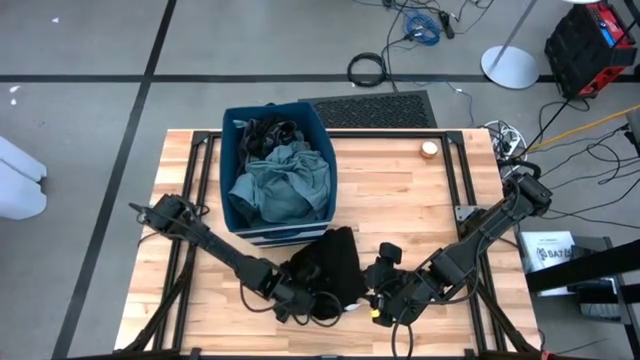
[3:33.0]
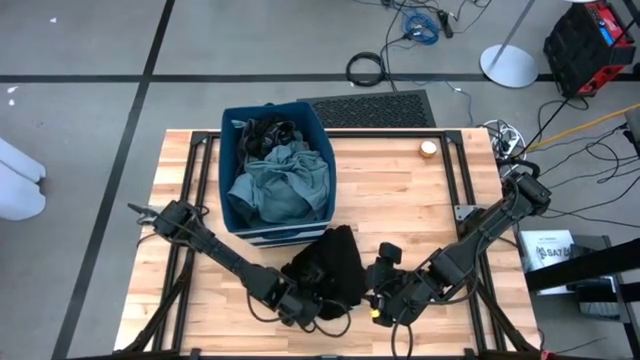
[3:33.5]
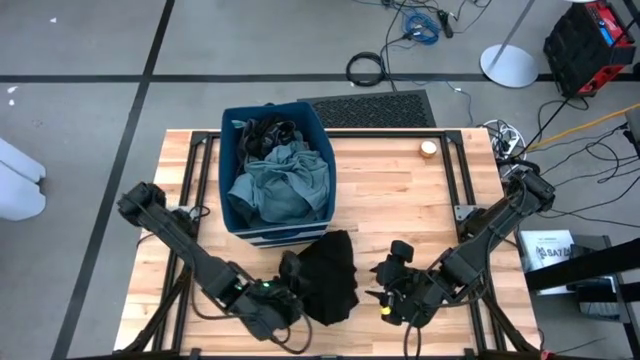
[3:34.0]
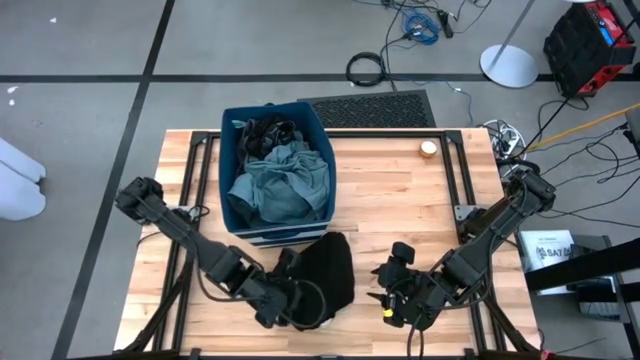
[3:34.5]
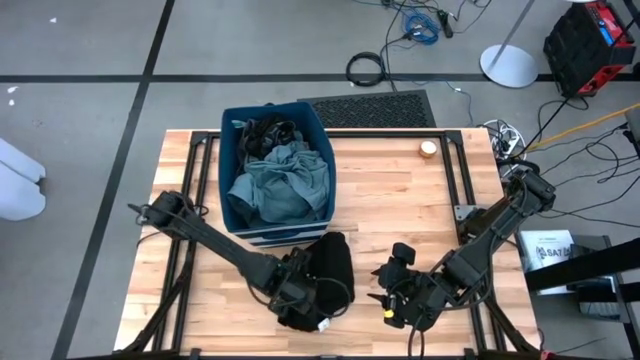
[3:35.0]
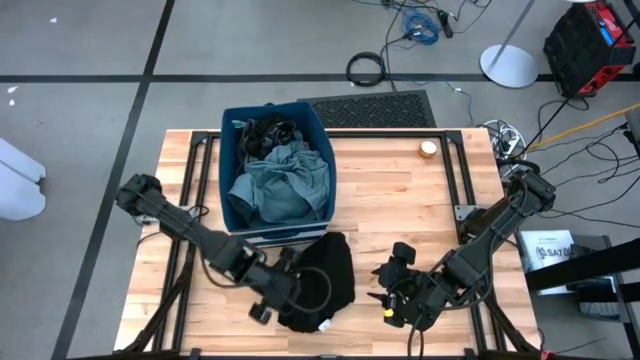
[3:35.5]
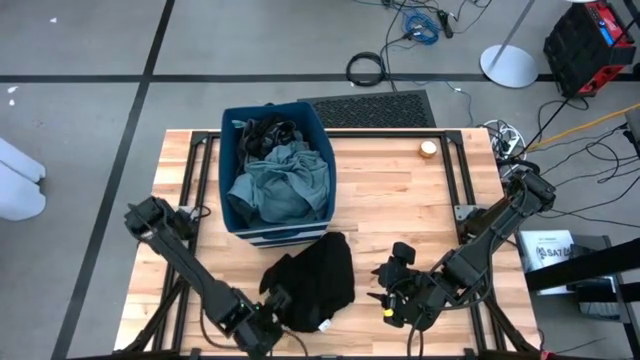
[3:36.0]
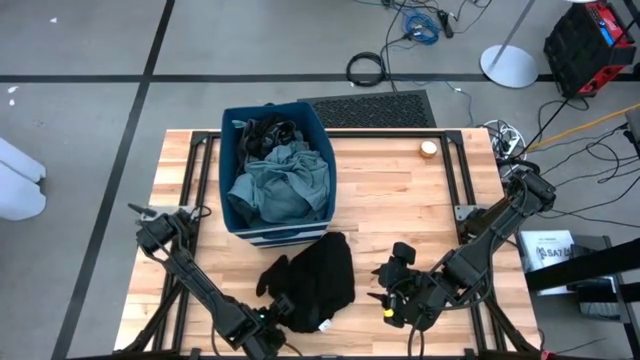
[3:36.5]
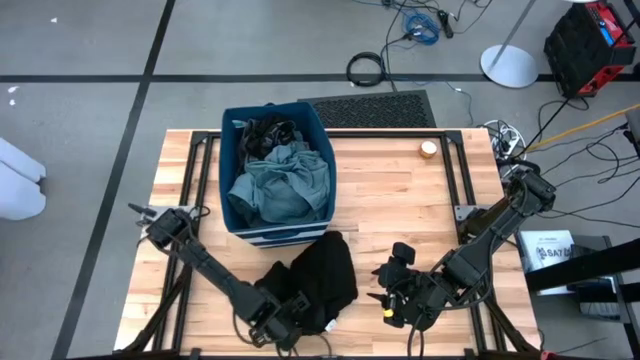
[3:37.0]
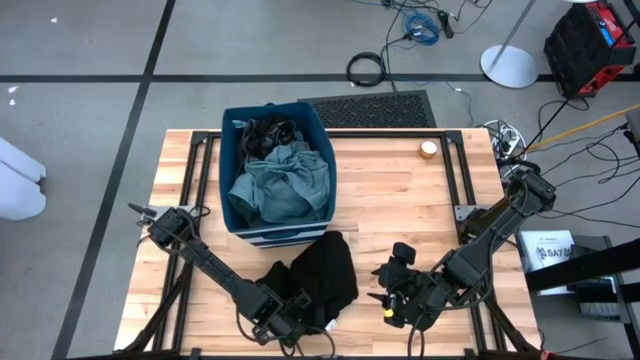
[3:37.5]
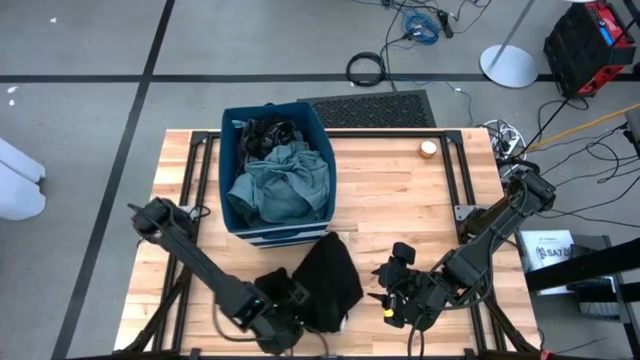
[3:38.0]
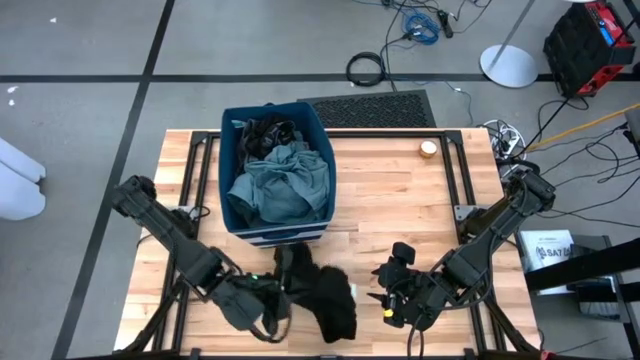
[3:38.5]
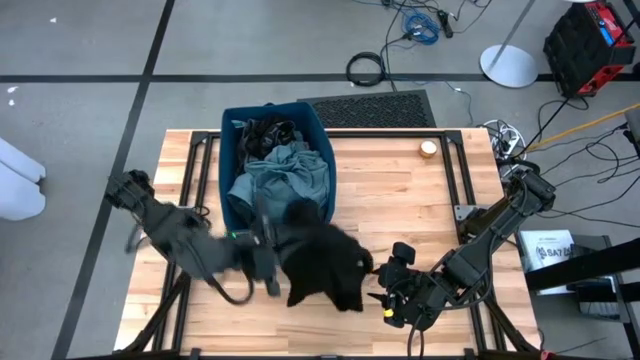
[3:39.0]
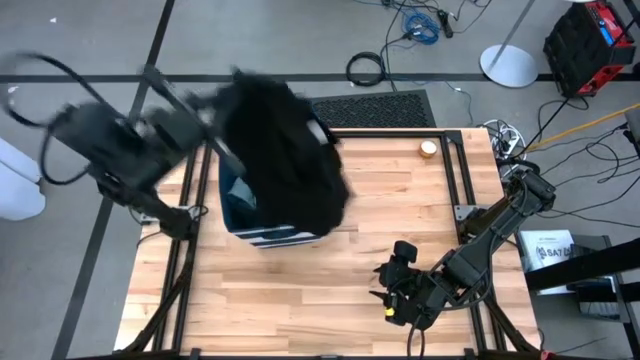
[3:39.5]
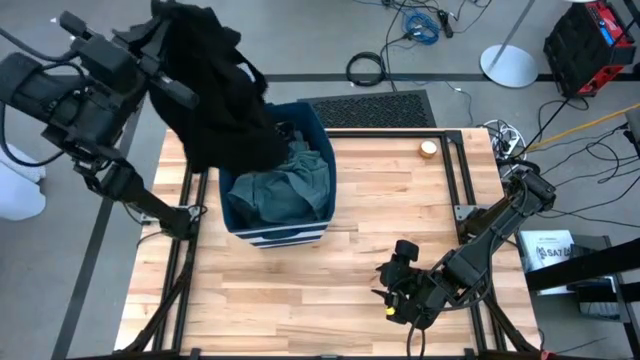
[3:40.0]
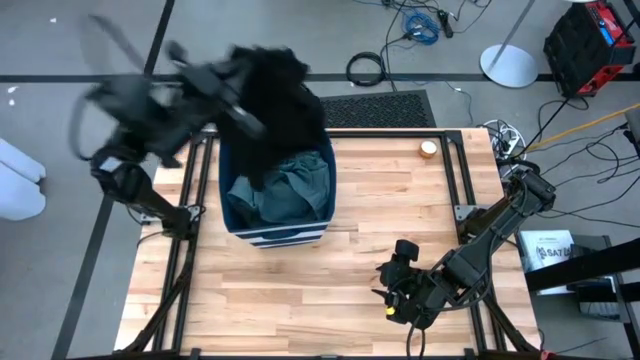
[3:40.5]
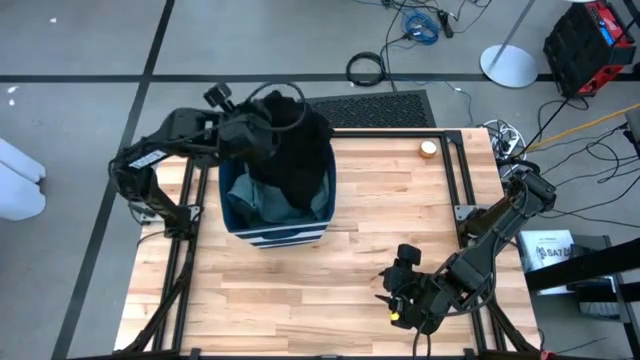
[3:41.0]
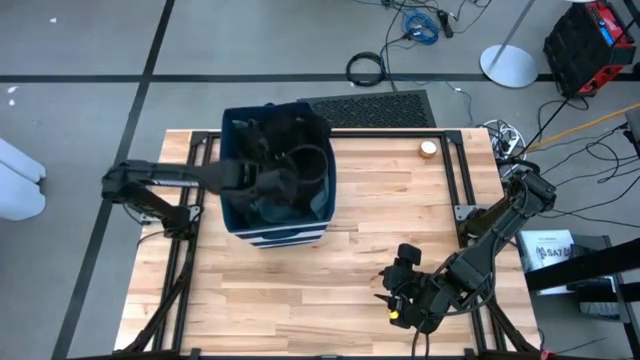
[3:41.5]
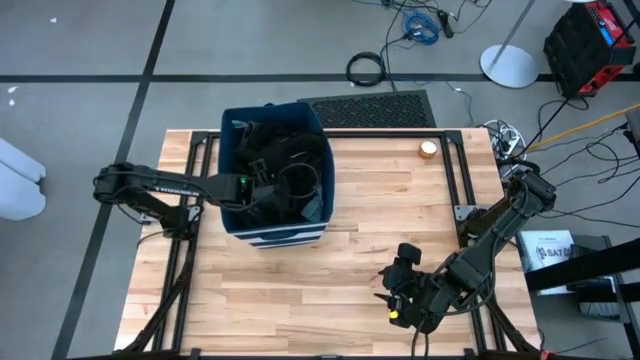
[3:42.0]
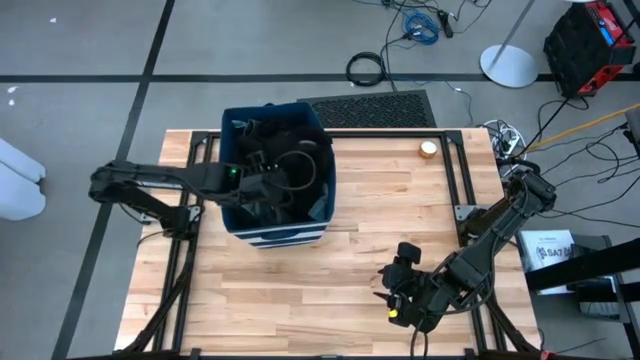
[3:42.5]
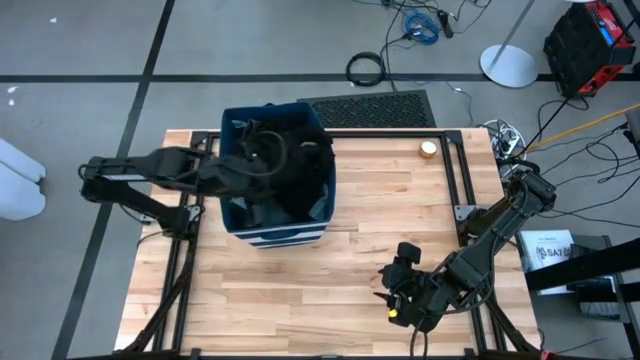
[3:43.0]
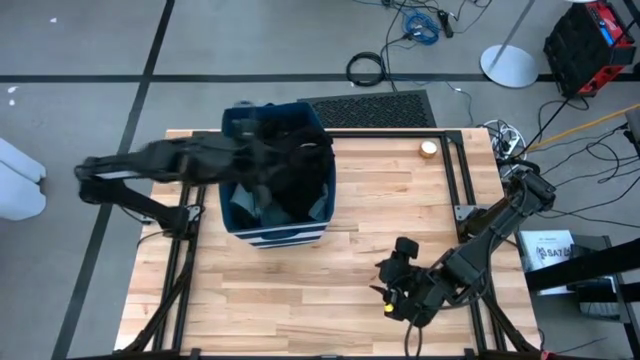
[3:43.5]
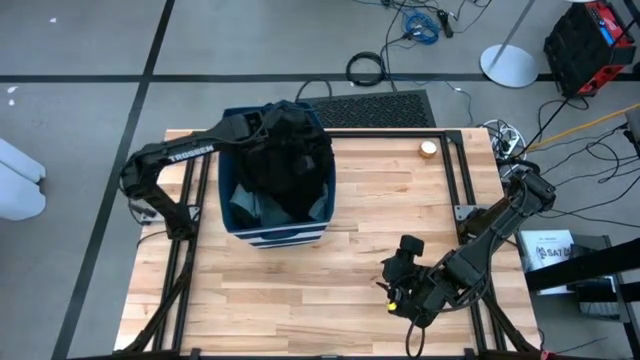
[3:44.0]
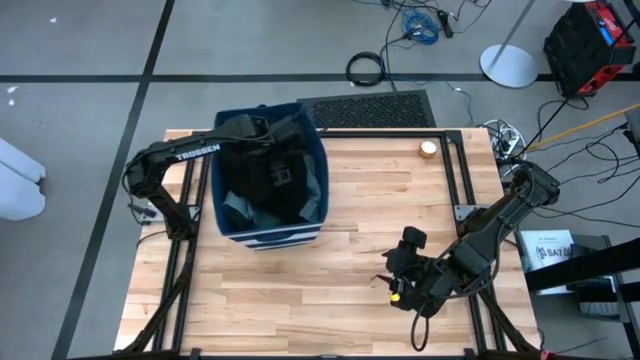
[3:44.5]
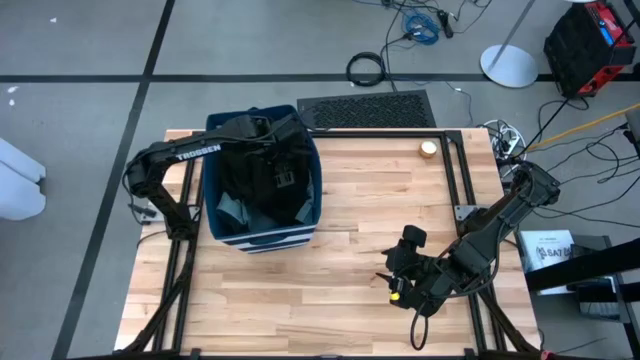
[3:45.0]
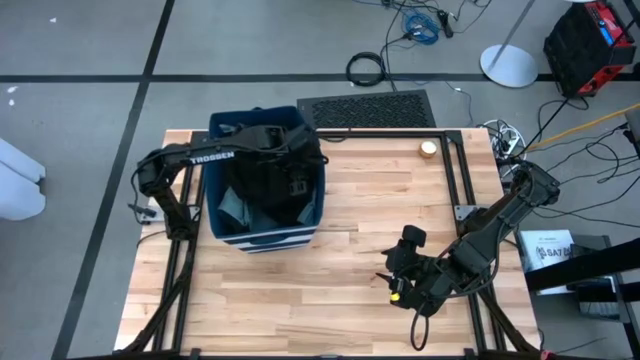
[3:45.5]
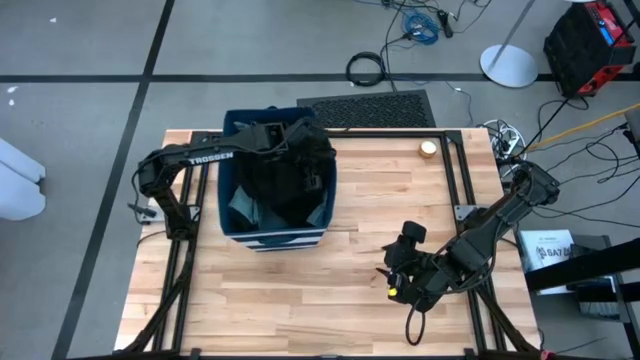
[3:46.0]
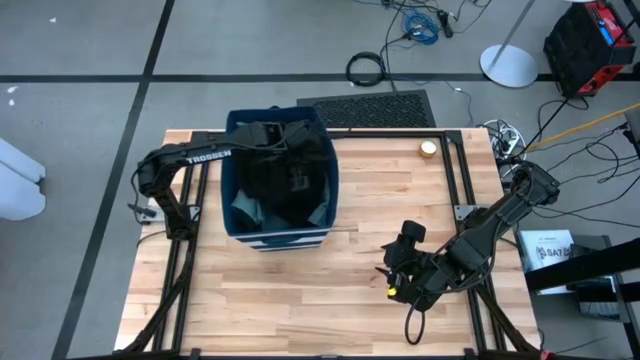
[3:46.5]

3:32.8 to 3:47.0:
Task: Sort clothes
Put the black shirt into the blue laundry organizer

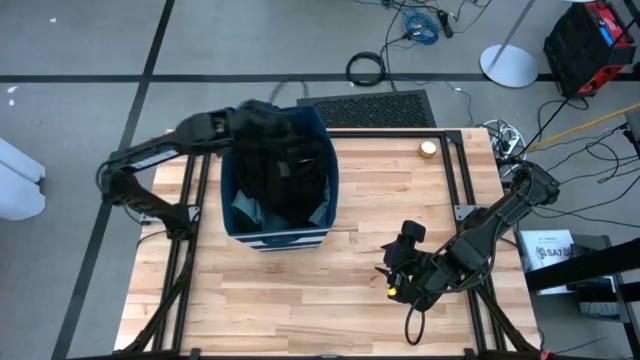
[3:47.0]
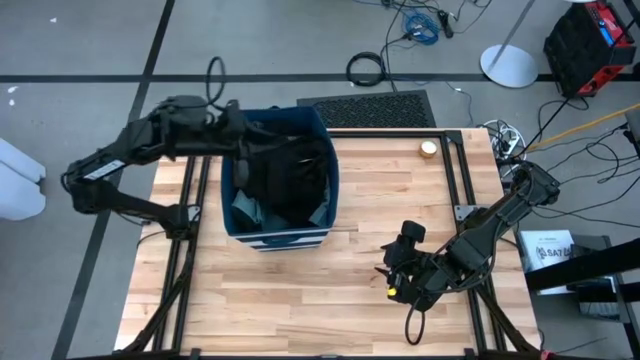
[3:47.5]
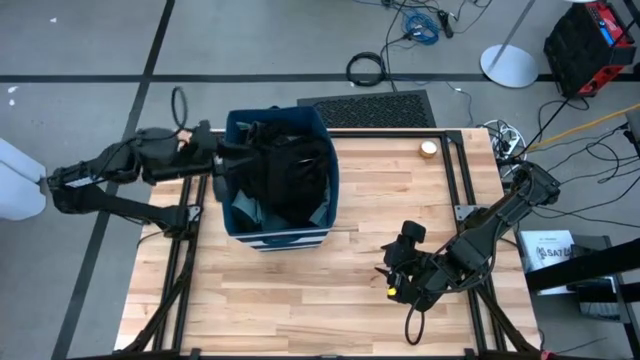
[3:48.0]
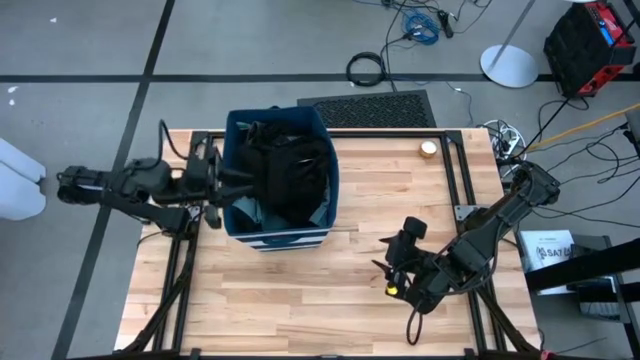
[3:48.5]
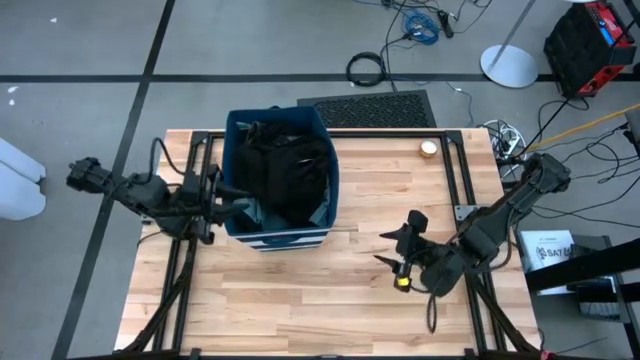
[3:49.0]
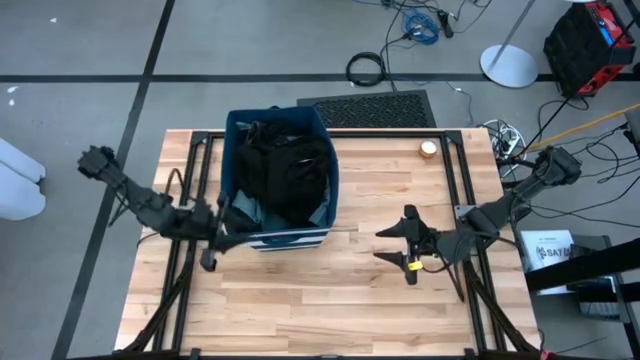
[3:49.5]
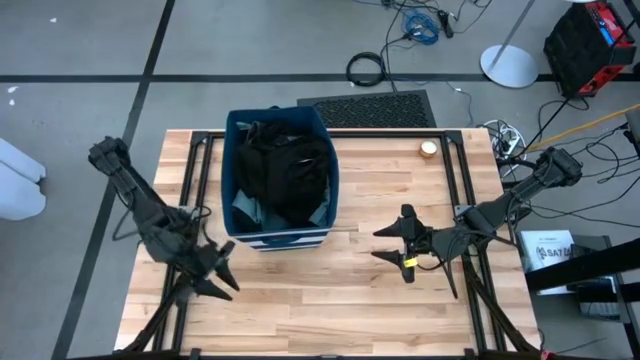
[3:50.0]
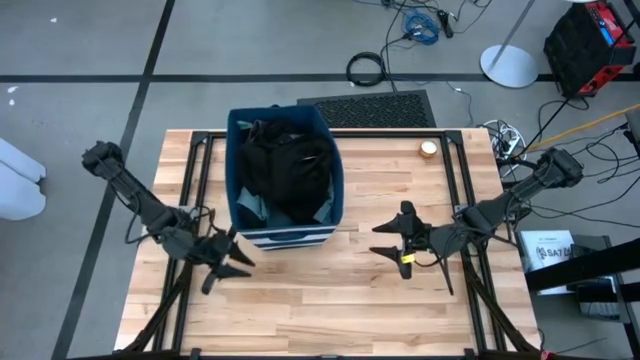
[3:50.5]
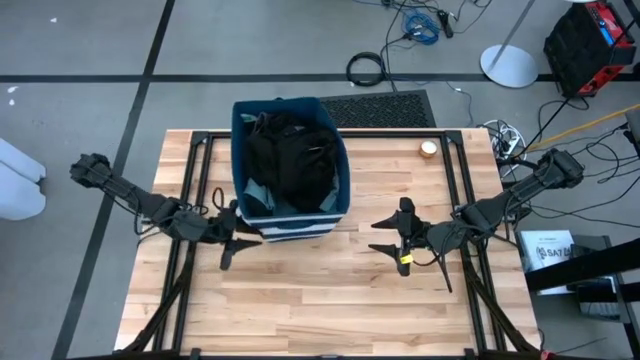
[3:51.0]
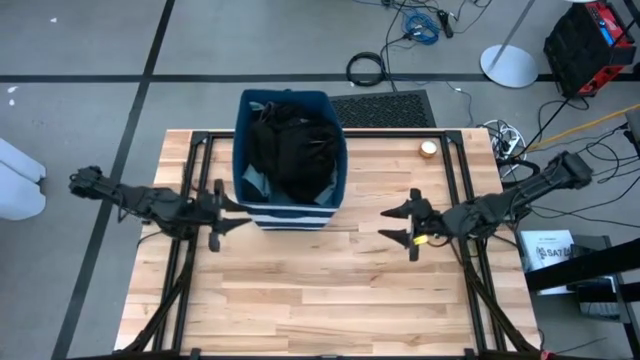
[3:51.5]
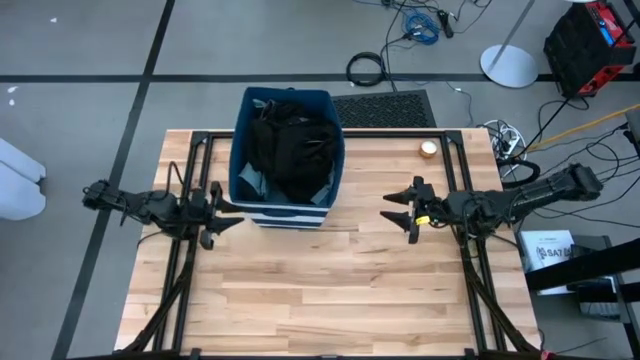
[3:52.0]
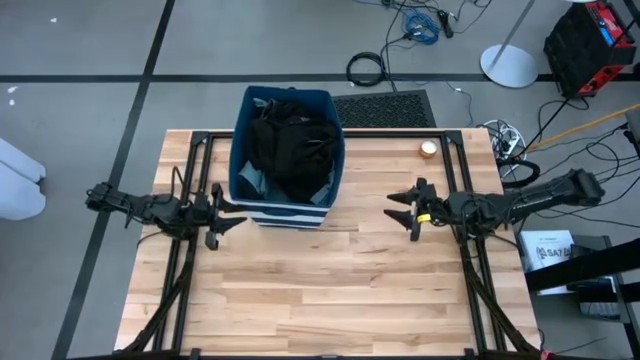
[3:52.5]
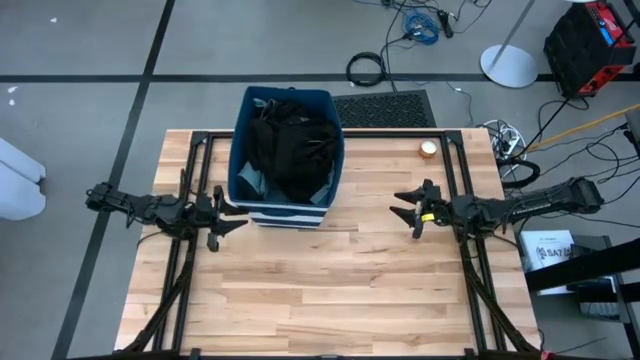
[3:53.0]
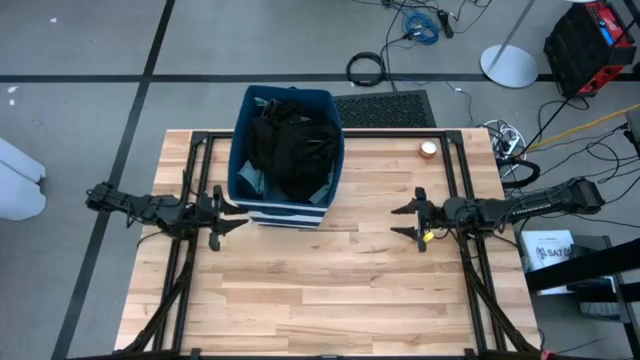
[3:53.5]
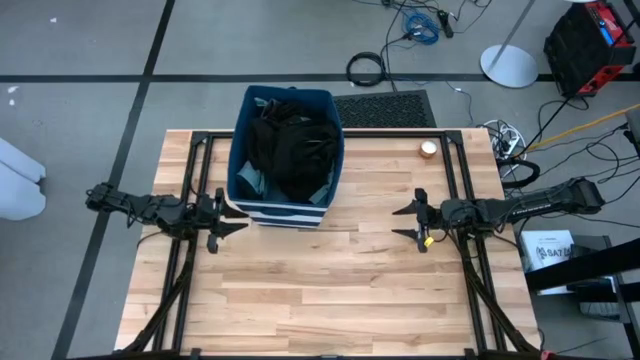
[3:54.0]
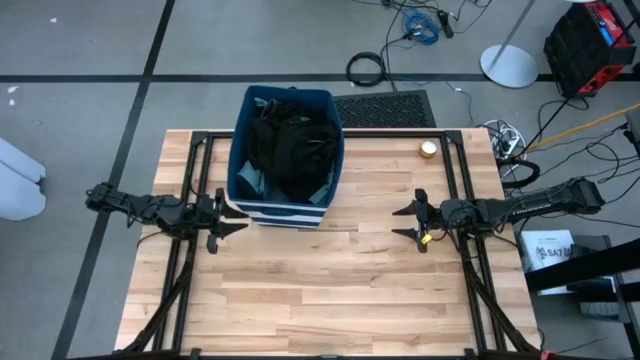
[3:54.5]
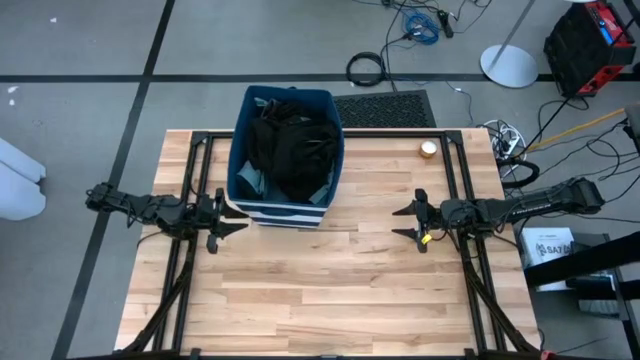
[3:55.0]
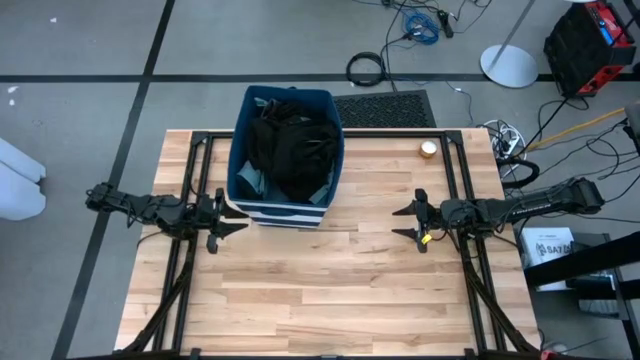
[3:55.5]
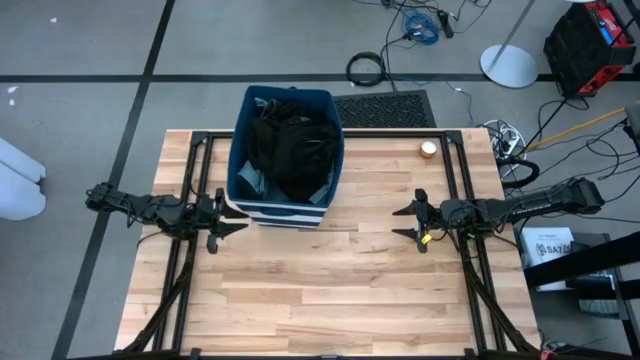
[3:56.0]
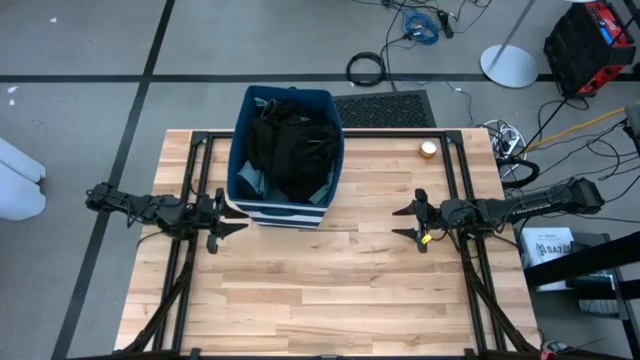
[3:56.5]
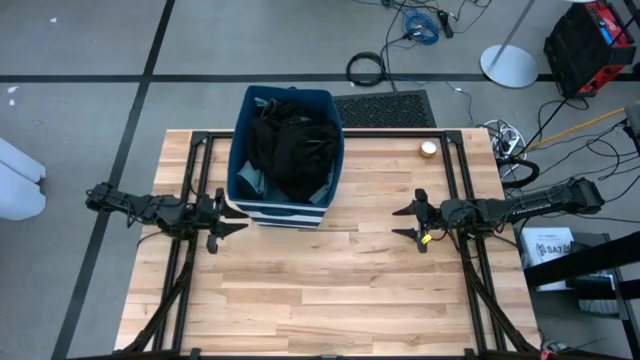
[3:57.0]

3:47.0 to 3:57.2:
Return to Home Position
